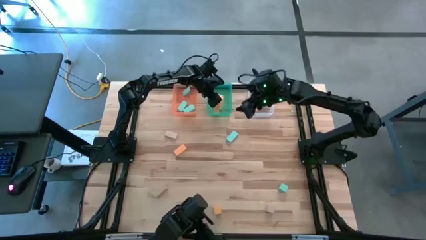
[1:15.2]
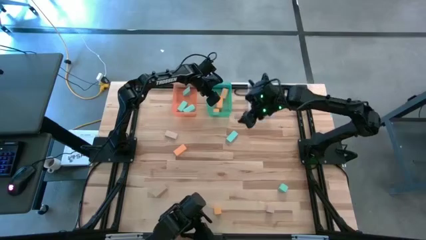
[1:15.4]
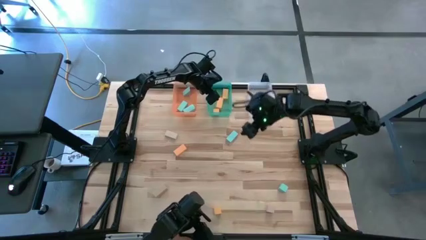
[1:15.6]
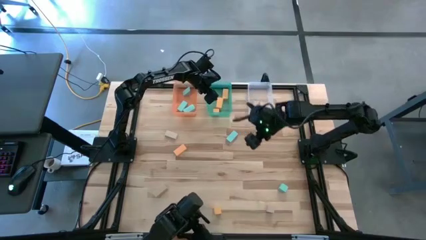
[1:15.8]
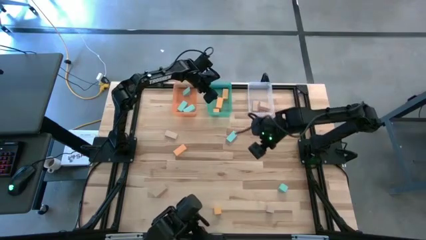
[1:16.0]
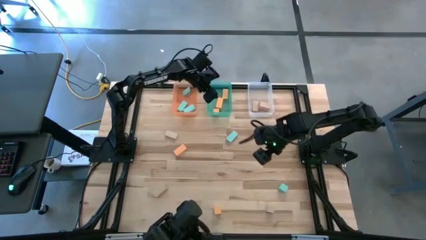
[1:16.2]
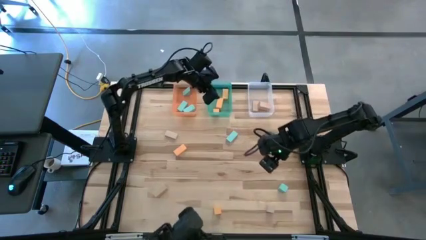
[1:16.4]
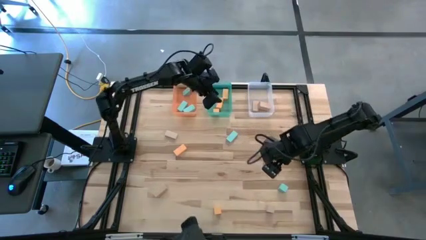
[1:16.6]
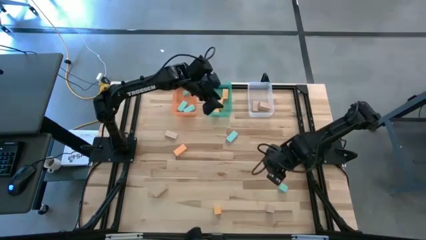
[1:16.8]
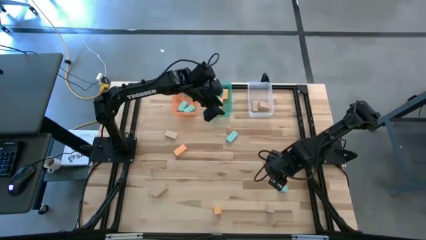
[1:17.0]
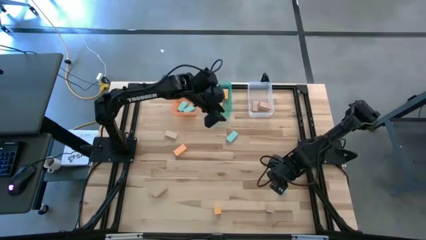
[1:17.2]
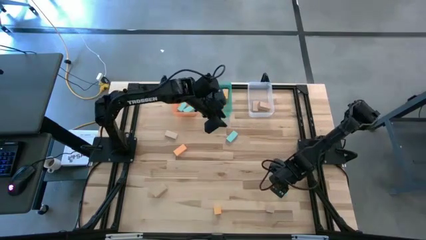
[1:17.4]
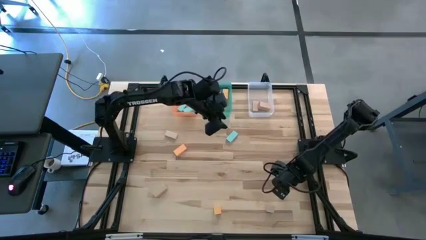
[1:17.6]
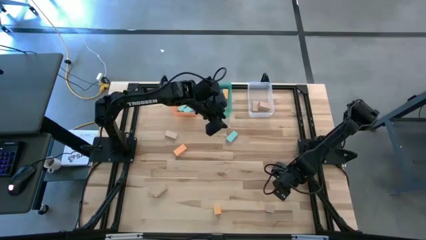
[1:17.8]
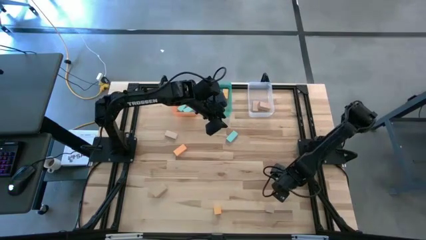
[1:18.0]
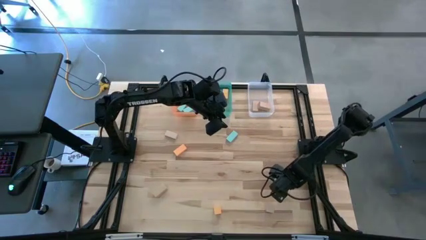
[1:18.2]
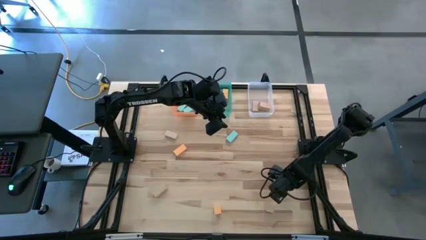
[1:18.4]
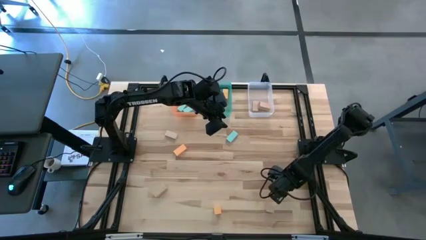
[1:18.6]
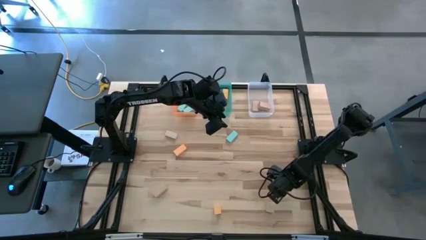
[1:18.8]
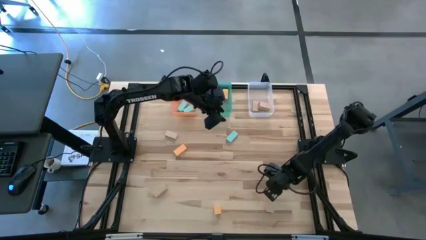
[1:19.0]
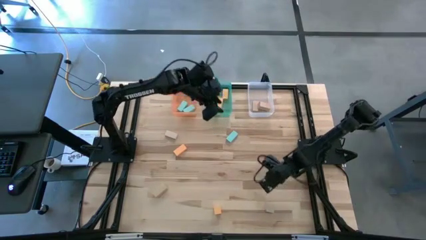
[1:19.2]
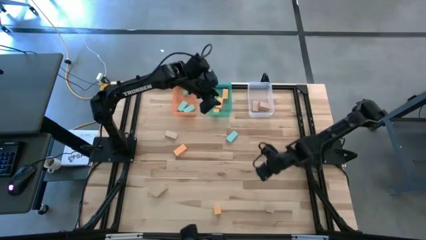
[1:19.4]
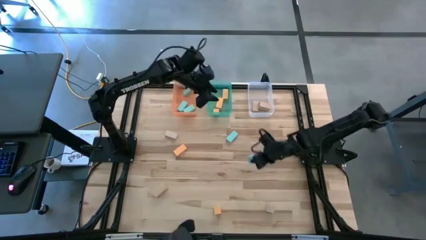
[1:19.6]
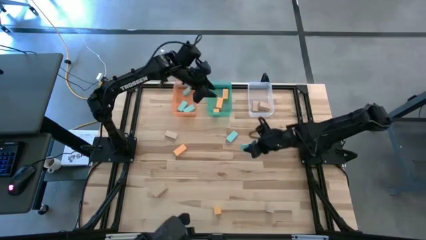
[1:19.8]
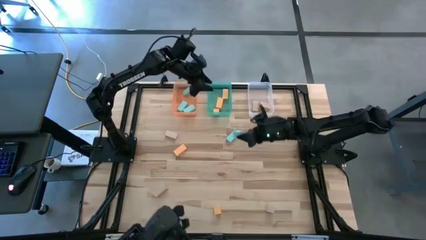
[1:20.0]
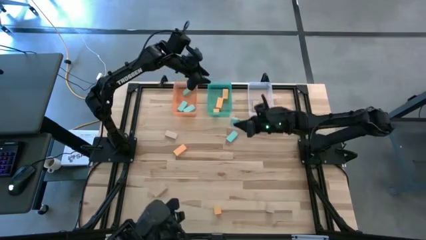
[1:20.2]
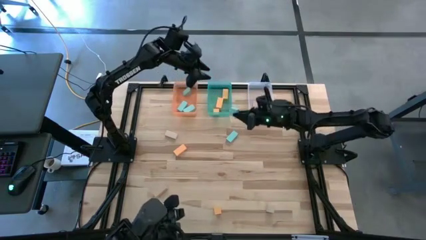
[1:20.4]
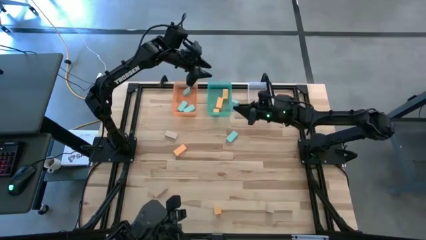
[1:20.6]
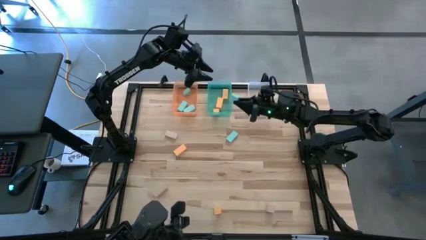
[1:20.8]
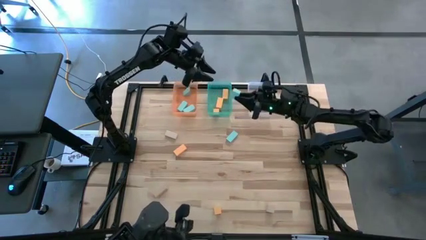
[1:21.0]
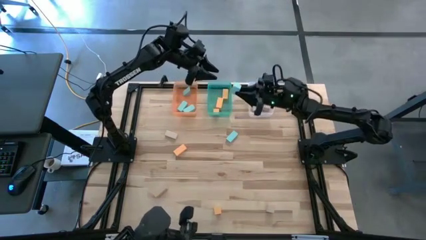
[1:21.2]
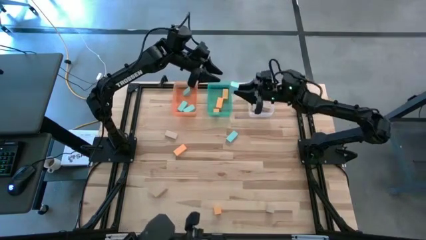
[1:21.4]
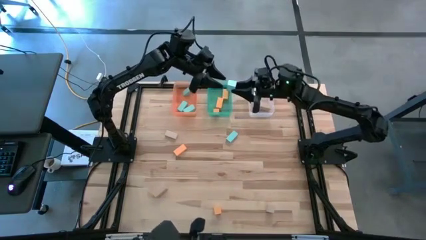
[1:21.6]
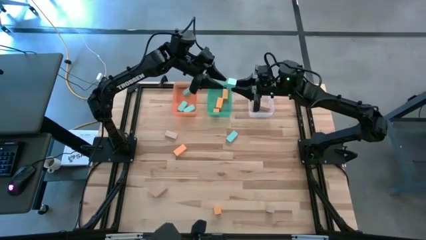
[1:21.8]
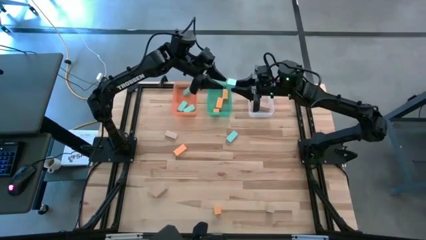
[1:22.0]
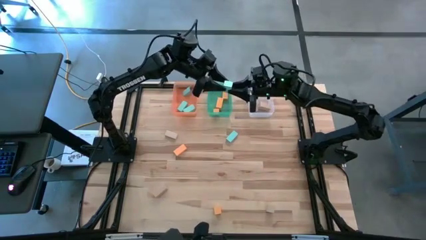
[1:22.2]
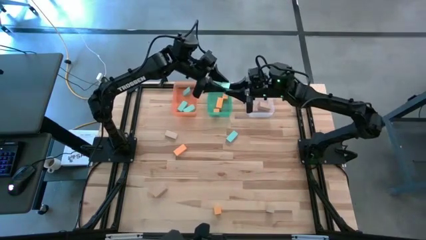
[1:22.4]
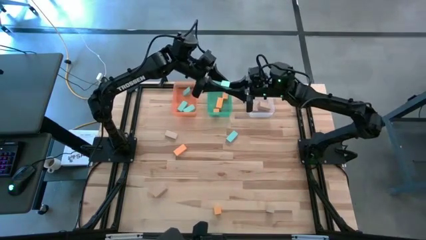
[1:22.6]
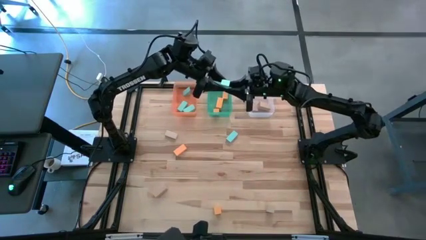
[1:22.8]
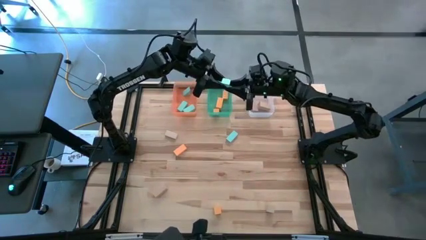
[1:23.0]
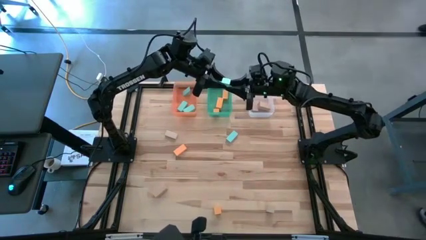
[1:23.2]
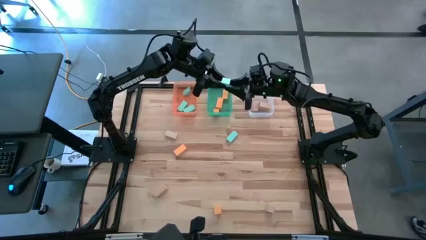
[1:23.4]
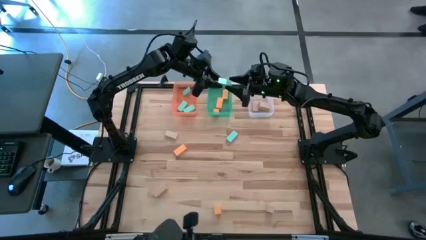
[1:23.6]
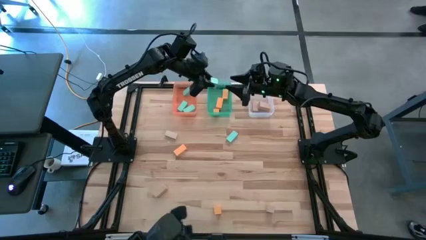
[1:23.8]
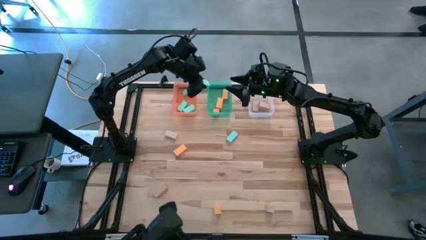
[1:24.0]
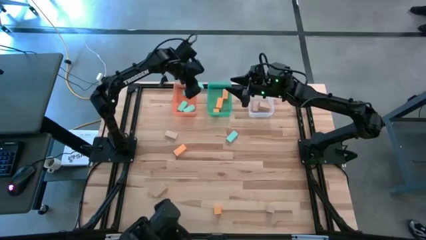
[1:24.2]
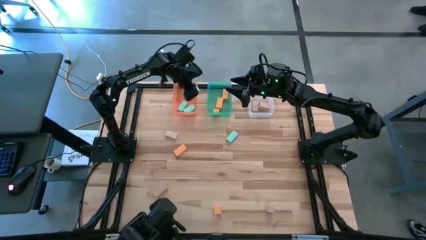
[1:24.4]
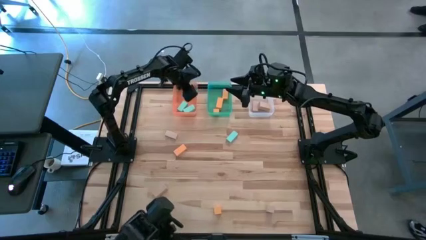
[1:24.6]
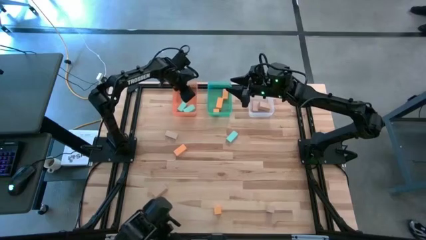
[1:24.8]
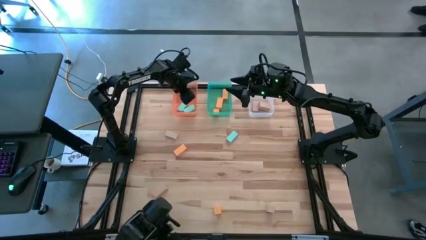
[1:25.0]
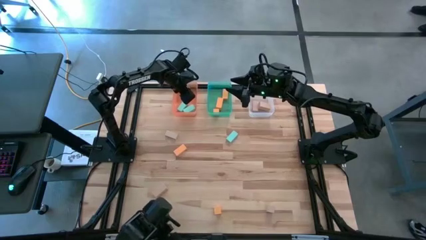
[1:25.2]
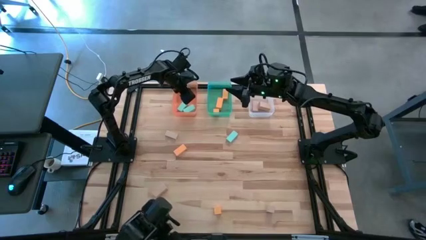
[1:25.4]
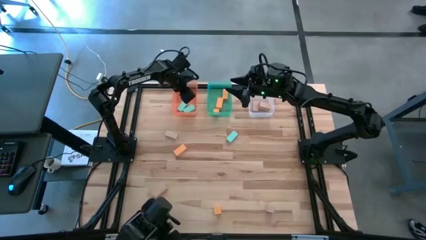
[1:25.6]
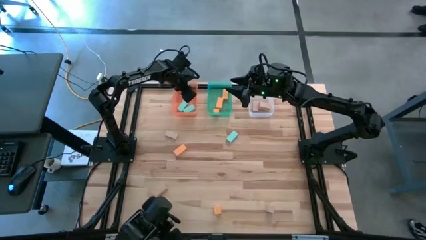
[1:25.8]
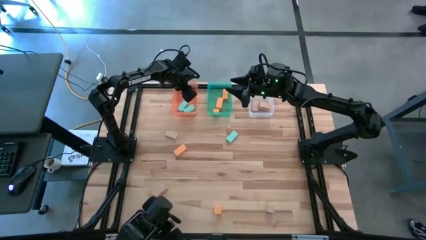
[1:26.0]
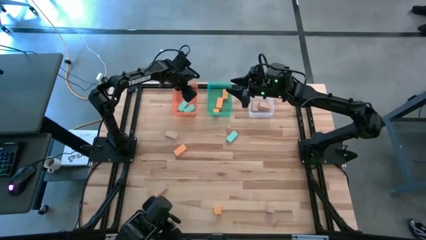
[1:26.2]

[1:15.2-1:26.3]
Task: Sort & place blocks by color
Put the light blue block into the orange bin

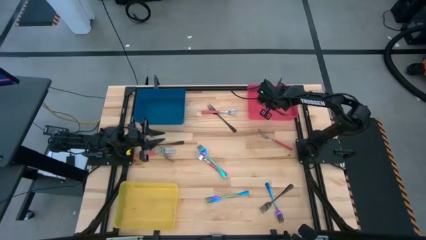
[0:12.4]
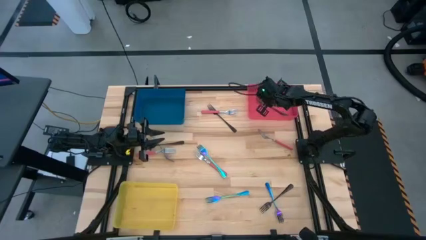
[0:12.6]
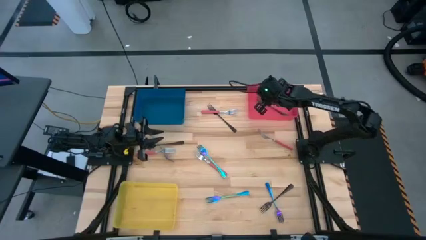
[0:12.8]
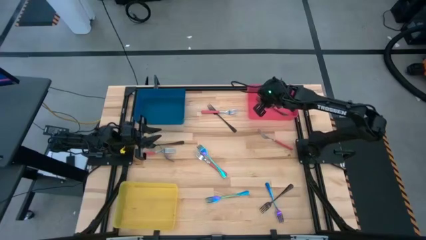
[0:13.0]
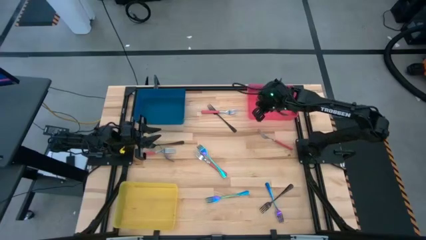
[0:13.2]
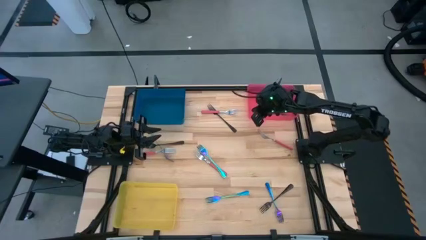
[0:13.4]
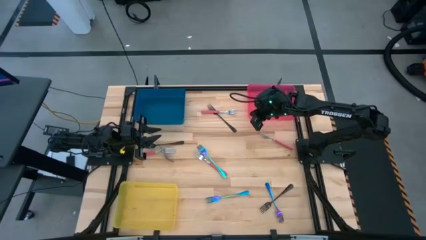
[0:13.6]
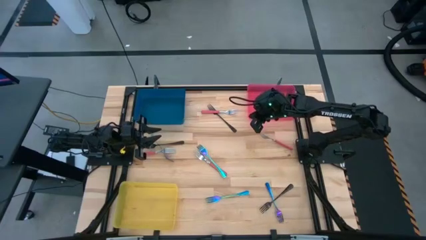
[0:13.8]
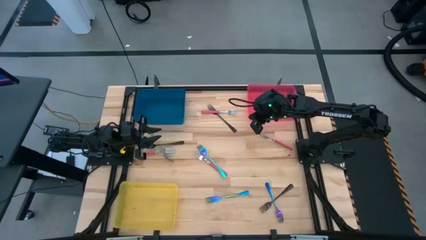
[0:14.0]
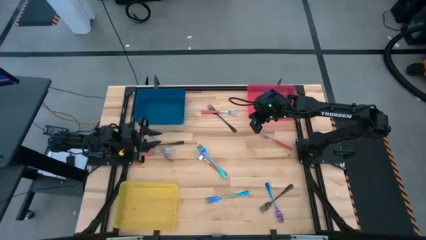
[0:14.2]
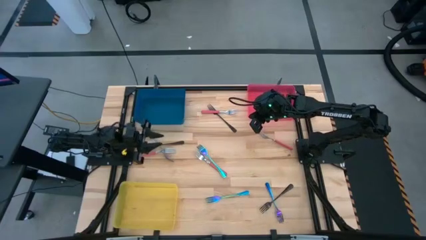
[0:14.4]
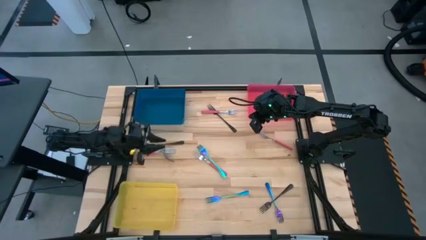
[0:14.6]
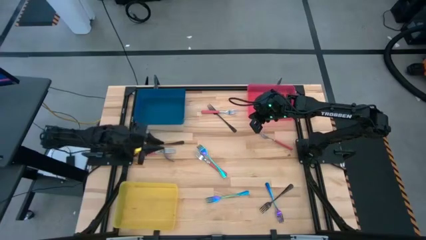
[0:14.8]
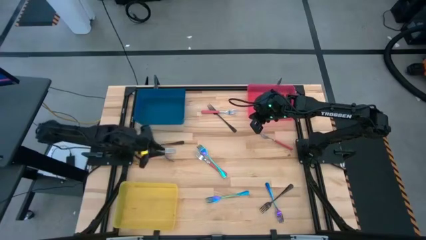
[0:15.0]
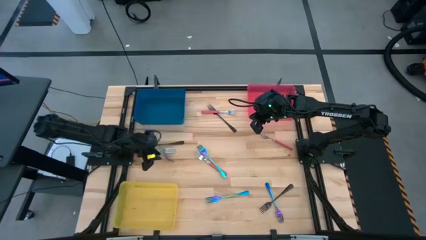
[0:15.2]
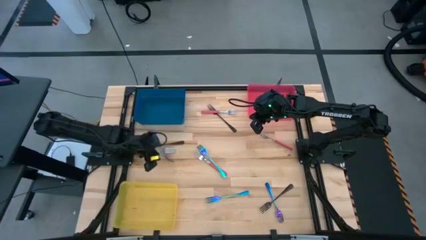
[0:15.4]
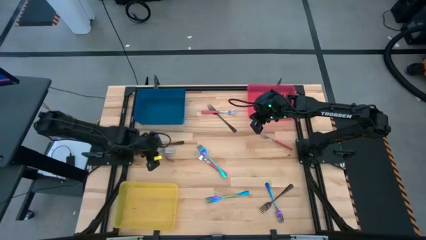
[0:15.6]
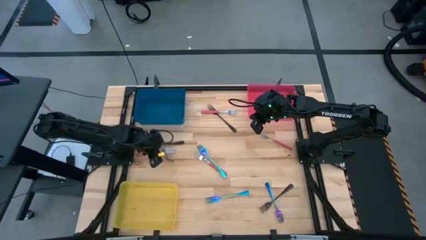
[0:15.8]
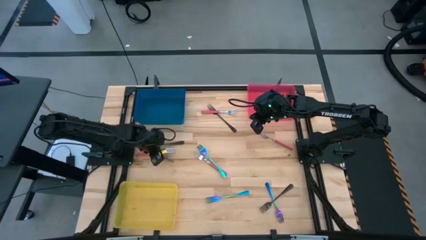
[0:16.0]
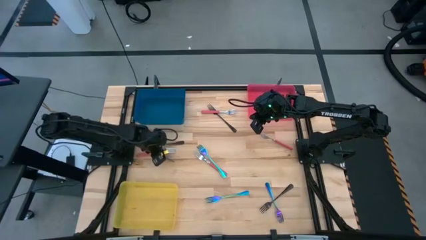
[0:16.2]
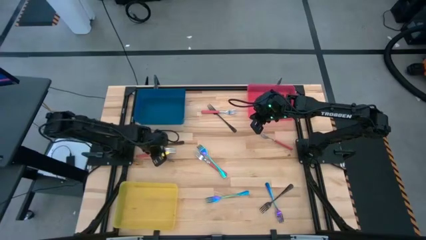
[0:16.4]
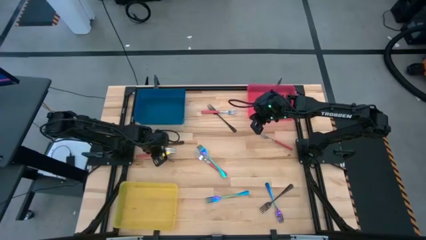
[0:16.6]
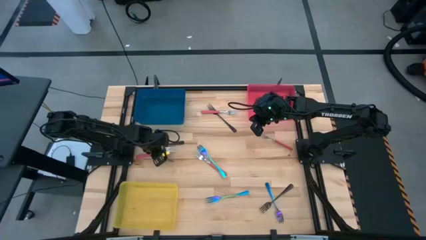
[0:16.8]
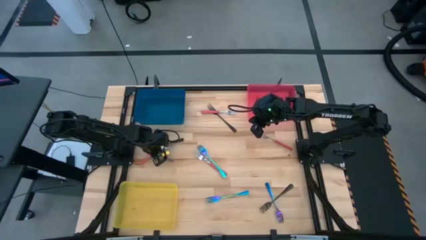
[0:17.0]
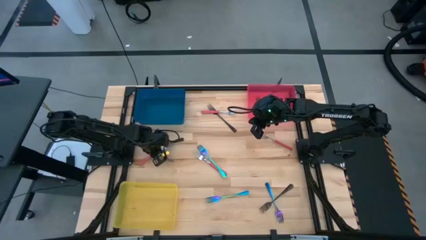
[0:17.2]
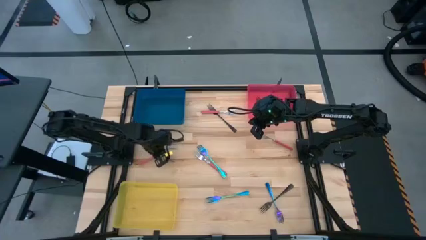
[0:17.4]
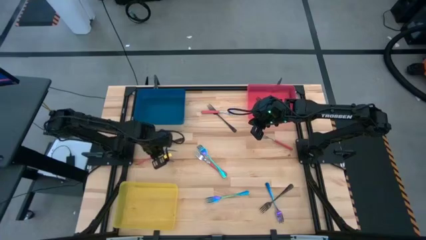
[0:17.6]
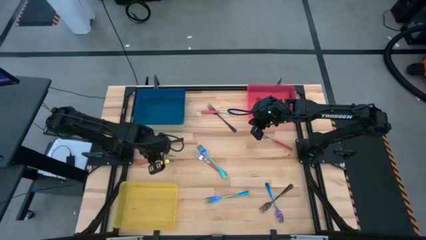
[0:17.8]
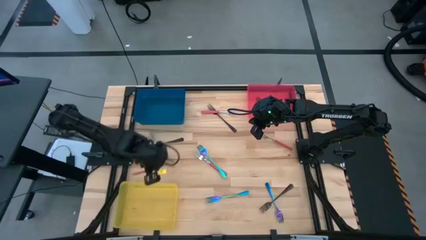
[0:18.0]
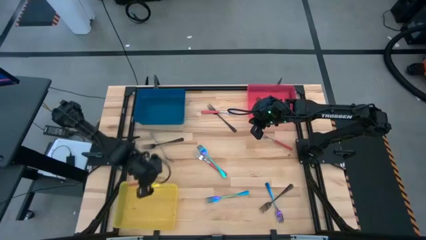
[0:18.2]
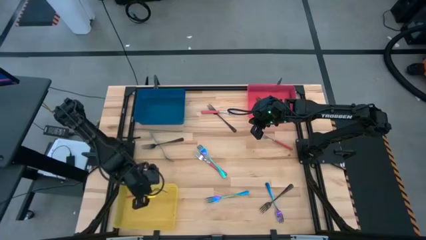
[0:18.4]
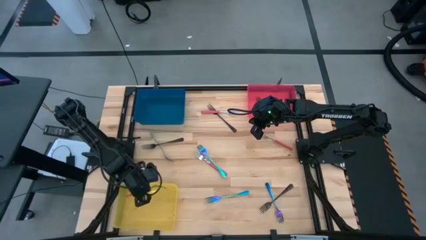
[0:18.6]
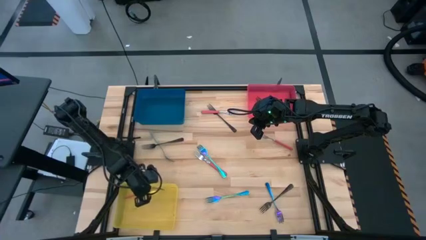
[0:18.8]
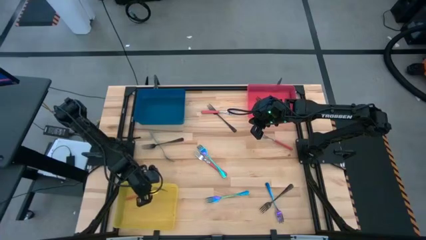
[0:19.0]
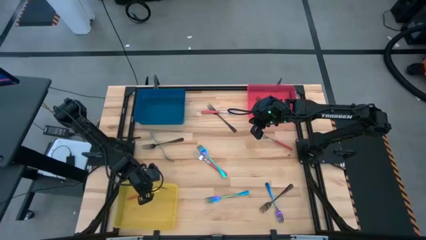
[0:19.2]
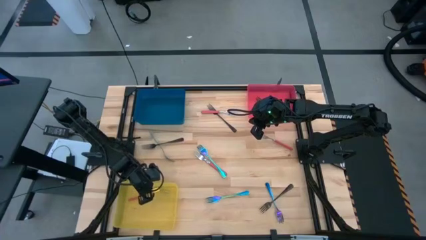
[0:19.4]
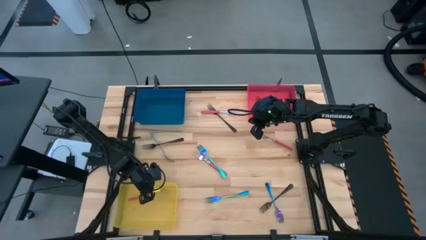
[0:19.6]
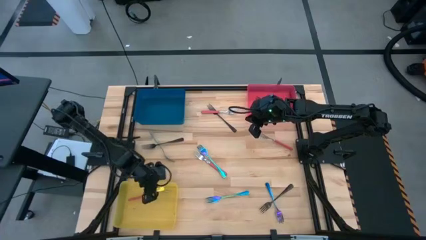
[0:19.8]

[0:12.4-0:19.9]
Task: Sort silverware by color (type)
Put the middle left pink fork into the yellow bin
